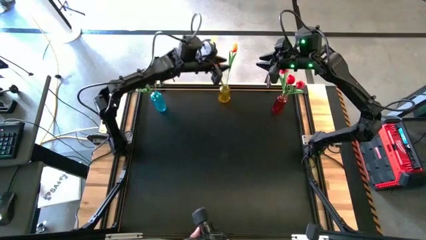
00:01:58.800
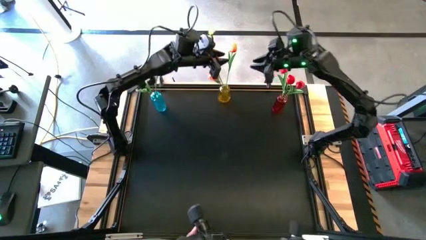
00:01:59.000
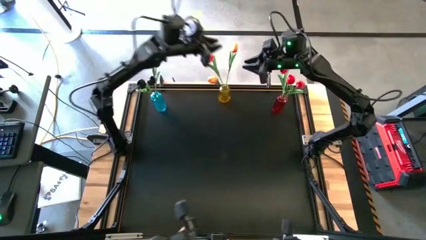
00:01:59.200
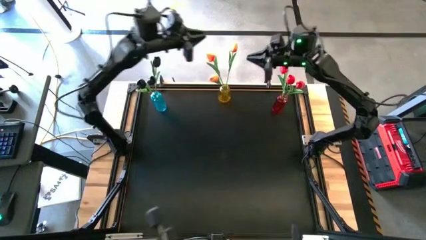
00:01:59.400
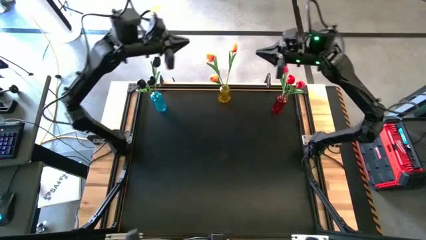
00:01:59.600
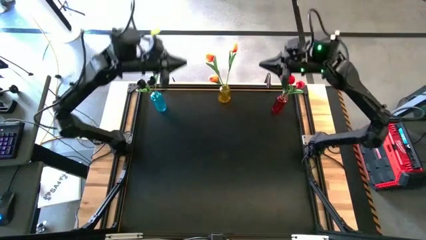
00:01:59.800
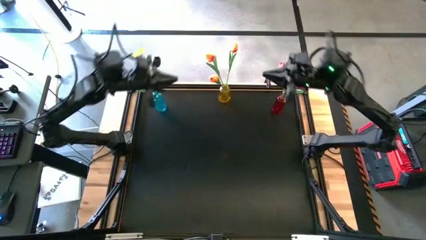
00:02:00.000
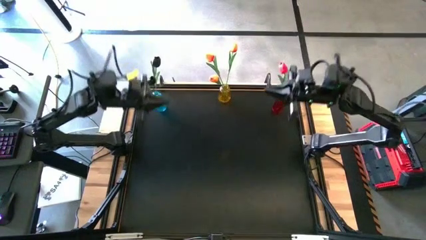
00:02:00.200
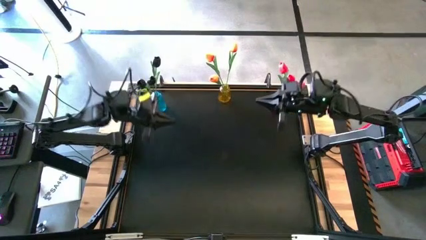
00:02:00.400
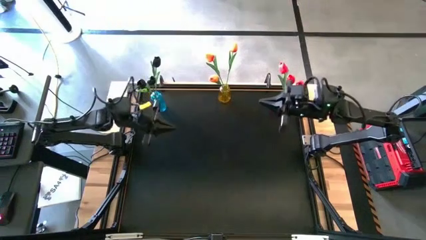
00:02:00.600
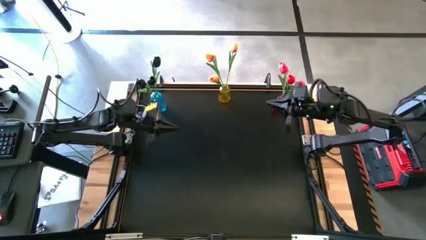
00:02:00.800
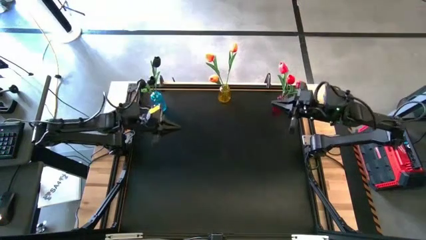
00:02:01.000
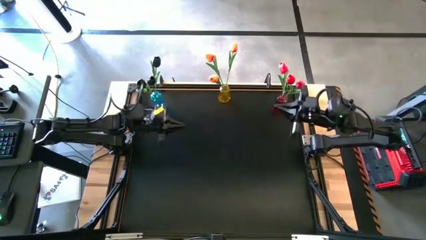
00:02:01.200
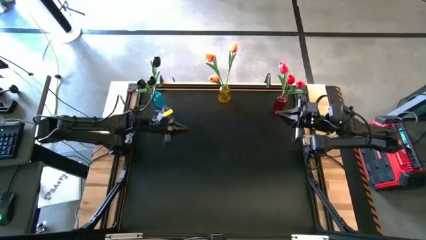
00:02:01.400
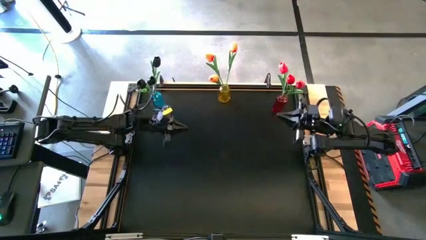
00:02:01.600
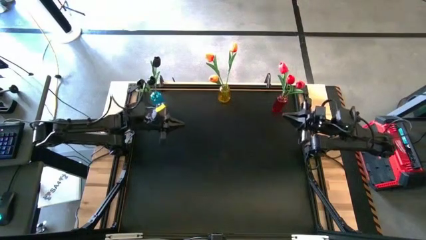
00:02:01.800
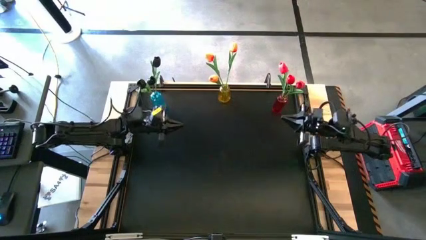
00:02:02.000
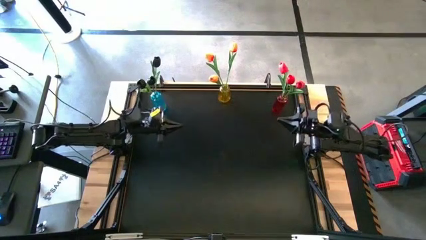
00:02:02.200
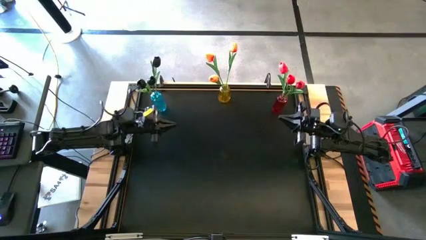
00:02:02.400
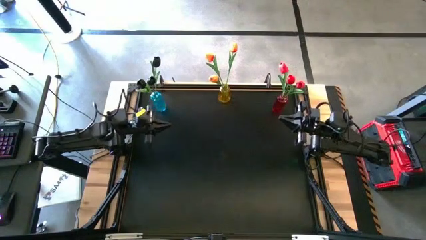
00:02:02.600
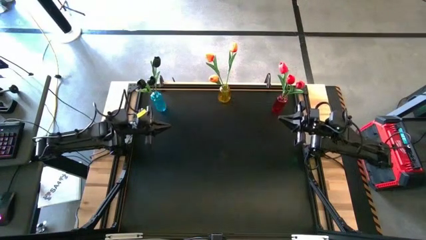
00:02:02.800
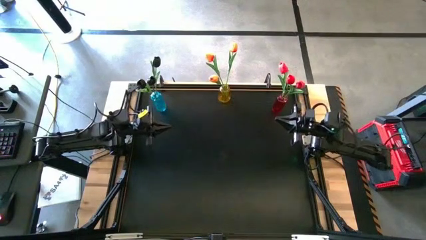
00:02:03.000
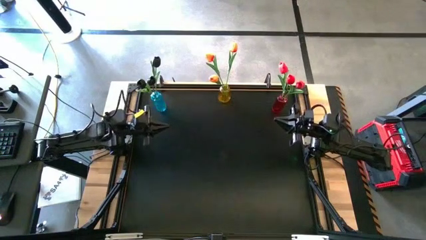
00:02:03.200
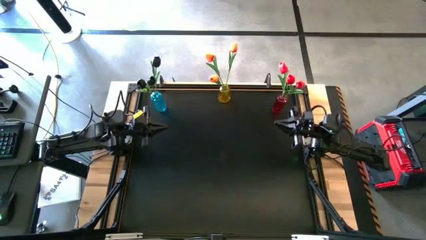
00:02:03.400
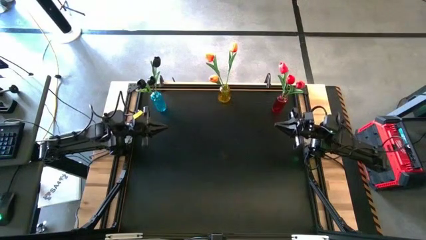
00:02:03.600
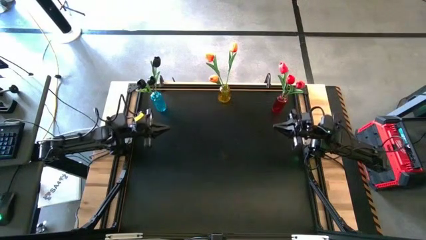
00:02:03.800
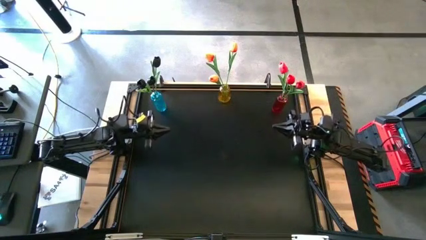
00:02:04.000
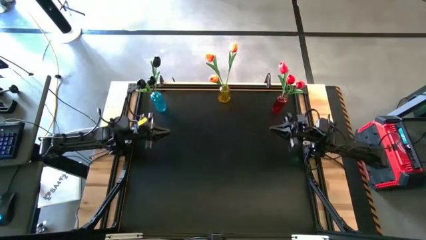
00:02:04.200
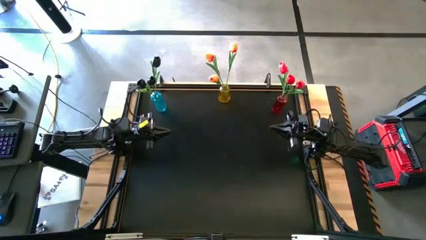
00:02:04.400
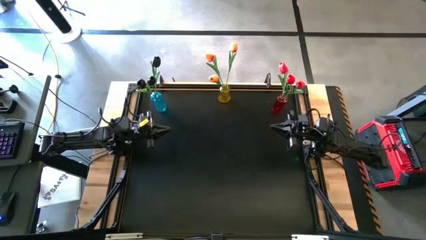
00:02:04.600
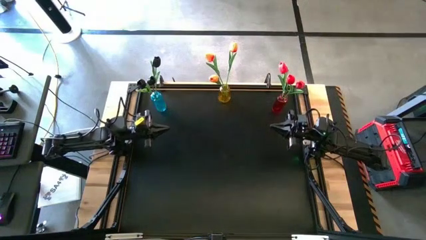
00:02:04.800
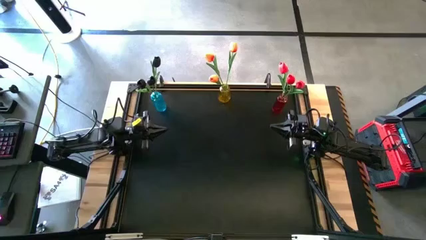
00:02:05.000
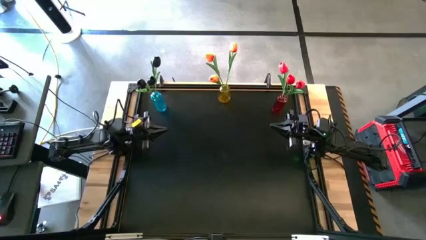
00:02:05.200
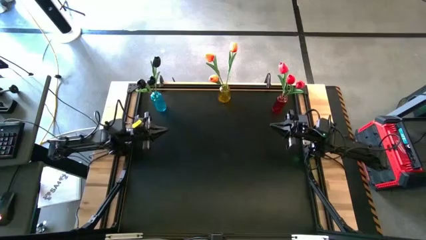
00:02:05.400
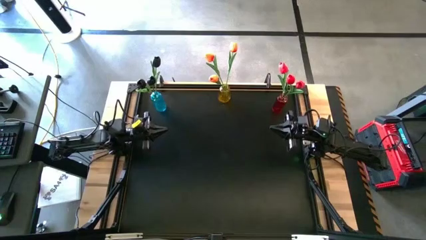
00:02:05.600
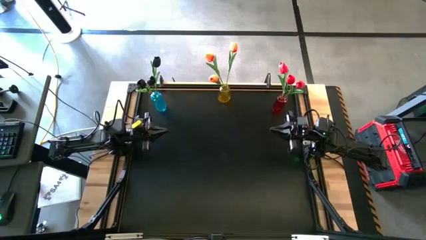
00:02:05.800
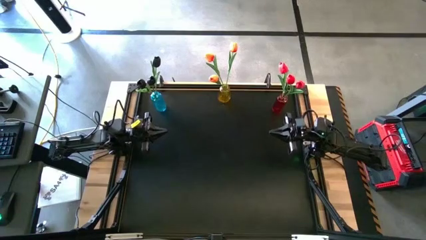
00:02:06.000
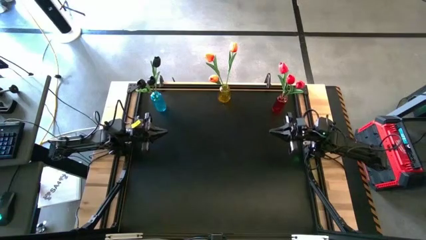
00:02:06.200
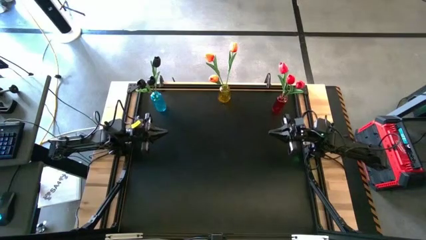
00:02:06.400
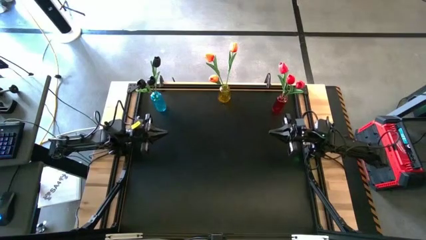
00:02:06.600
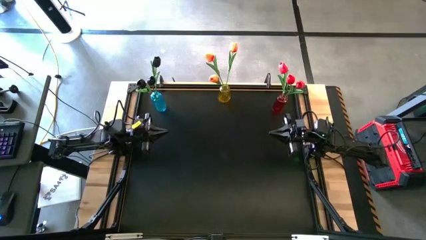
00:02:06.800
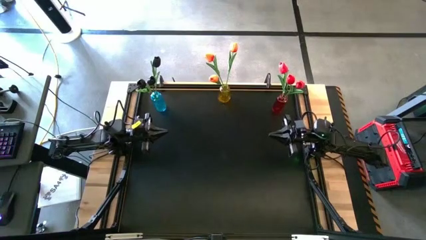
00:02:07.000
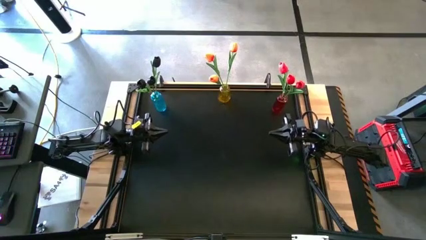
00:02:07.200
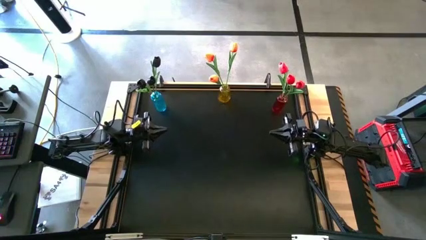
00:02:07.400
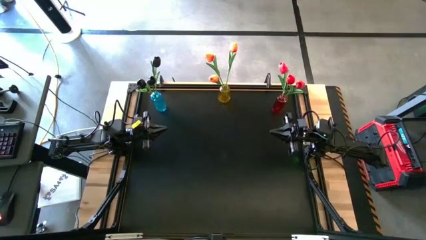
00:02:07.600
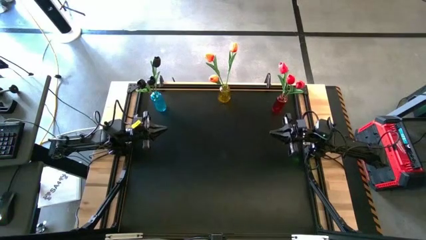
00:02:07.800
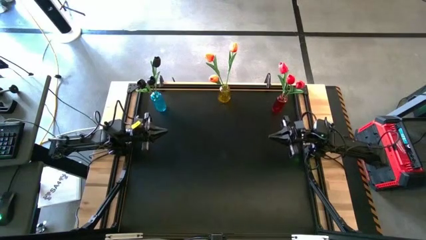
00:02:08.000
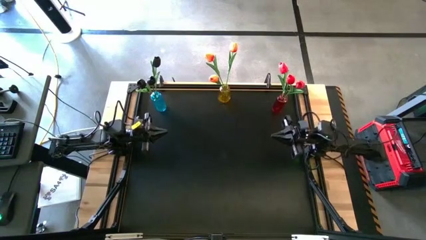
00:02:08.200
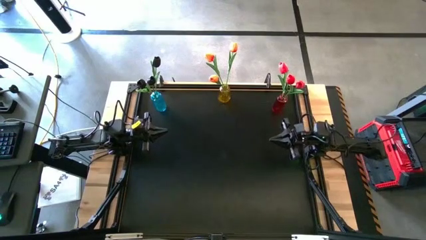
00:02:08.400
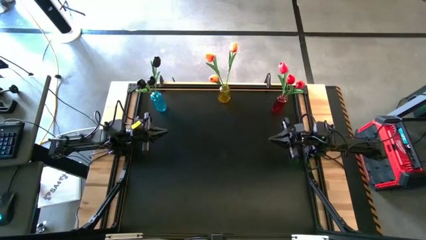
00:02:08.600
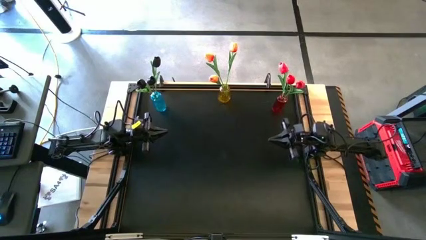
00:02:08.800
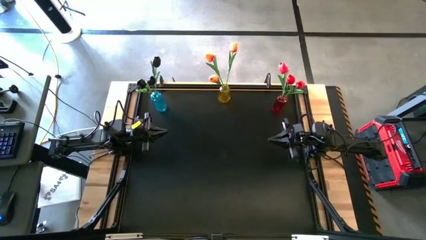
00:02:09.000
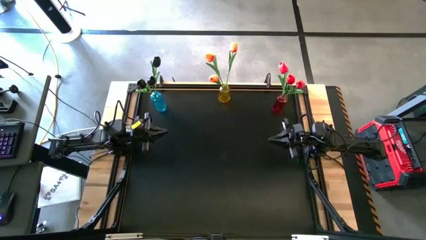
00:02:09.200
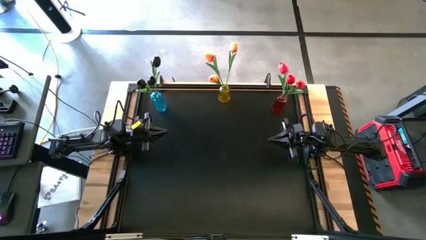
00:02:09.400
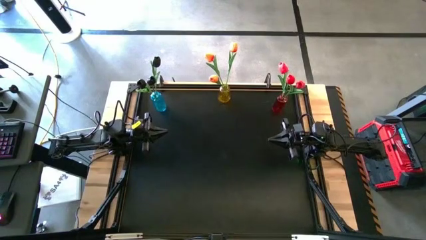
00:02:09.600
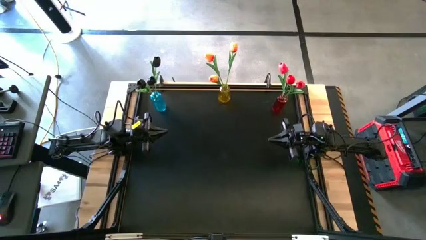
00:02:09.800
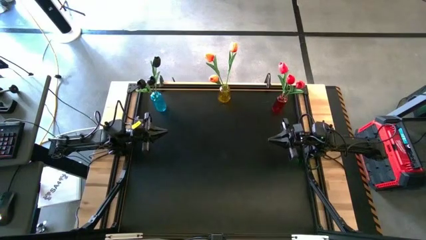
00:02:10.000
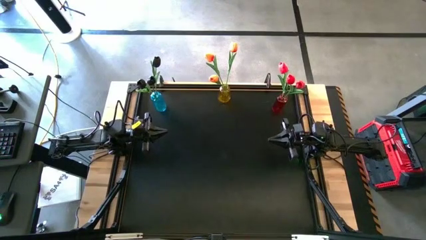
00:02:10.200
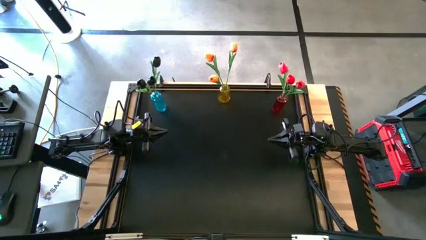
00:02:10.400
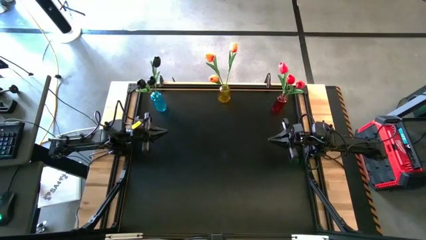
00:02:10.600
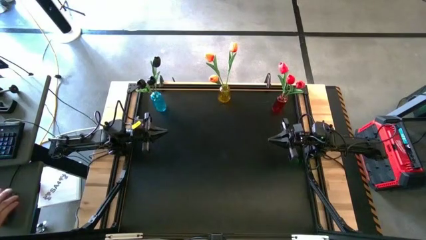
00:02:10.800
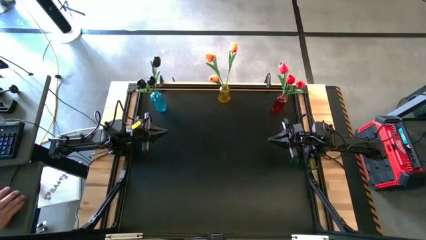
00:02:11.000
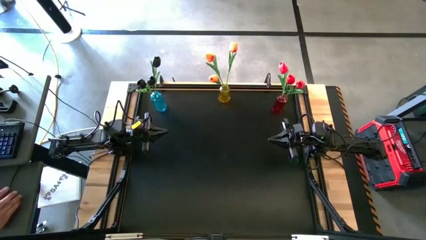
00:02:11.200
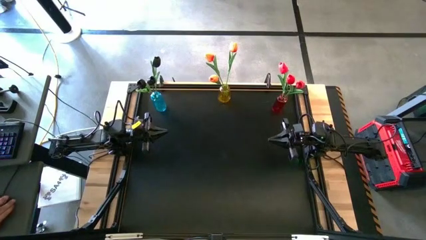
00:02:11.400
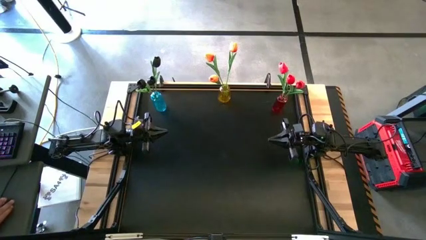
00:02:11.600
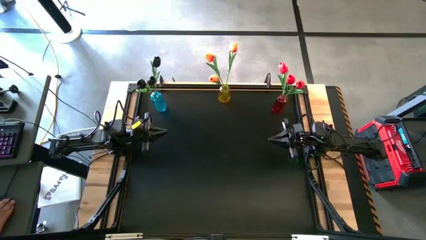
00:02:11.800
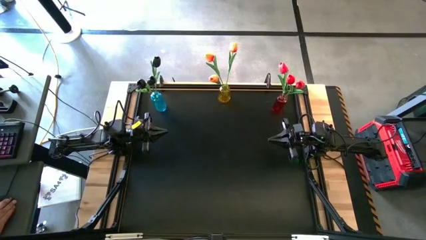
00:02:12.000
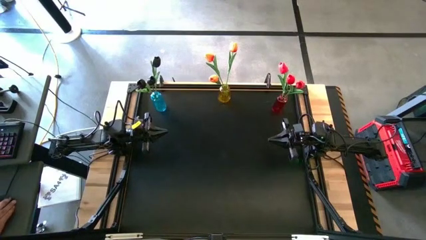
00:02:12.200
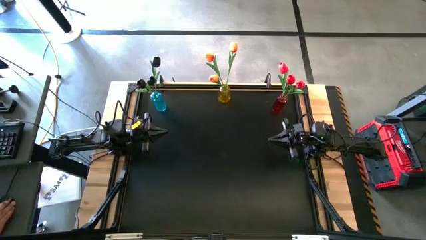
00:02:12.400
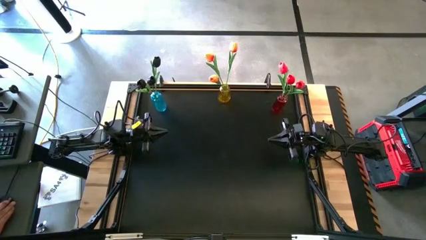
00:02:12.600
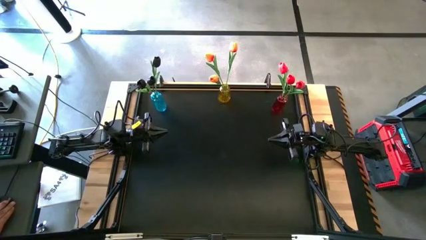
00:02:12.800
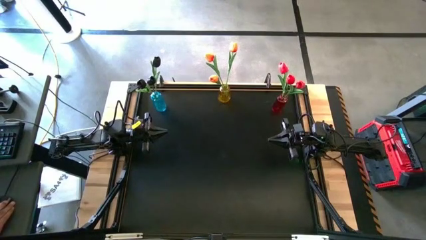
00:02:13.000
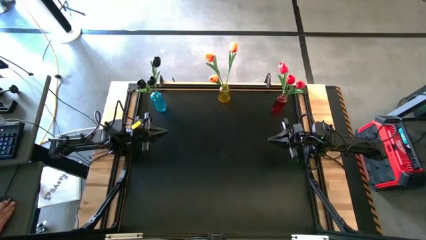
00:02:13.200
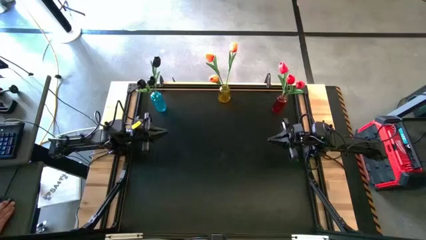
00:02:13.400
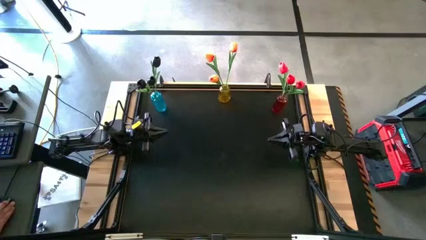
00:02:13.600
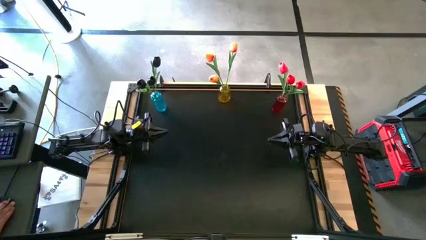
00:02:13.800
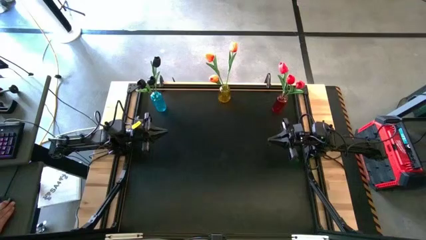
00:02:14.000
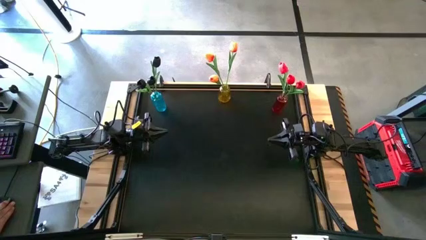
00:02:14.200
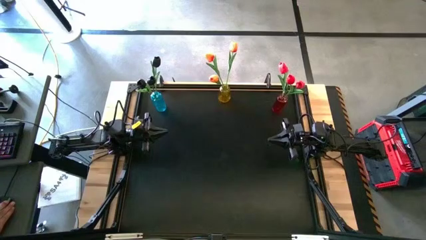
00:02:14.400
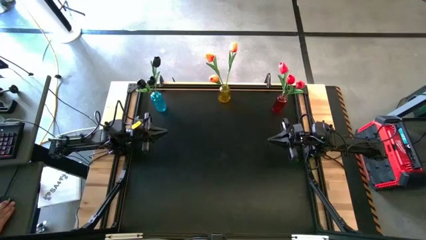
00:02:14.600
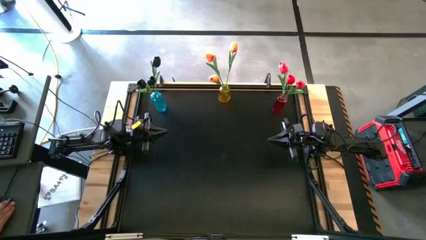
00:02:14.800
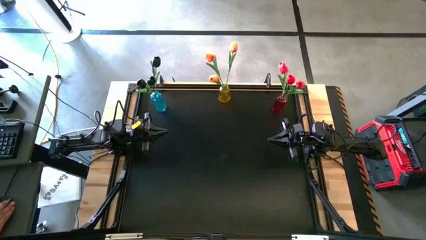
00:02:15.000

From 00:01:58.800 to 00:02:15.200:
Task: Sort flowers into vase by color
Return to Home Position
